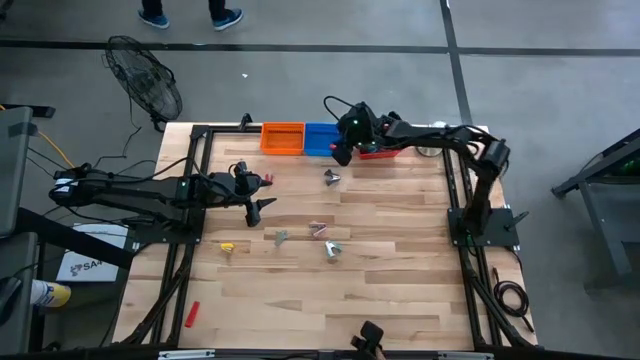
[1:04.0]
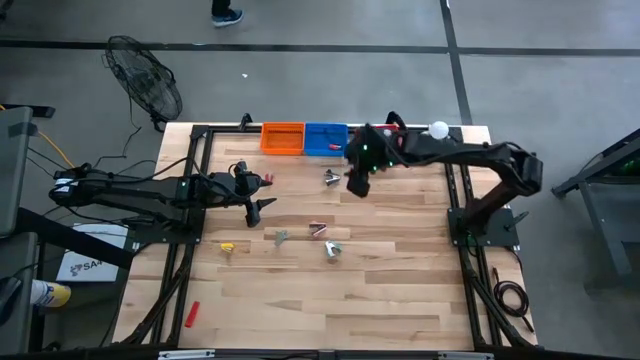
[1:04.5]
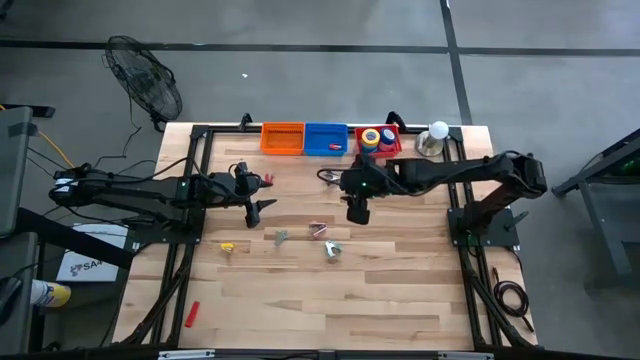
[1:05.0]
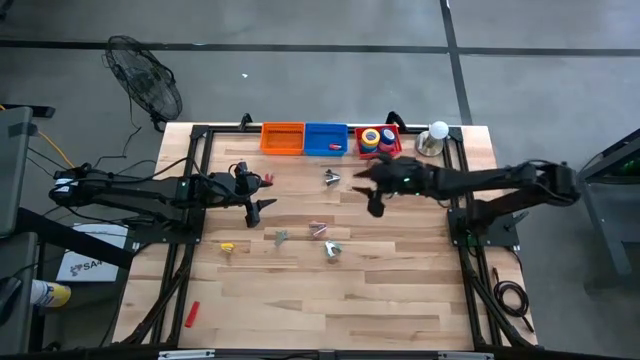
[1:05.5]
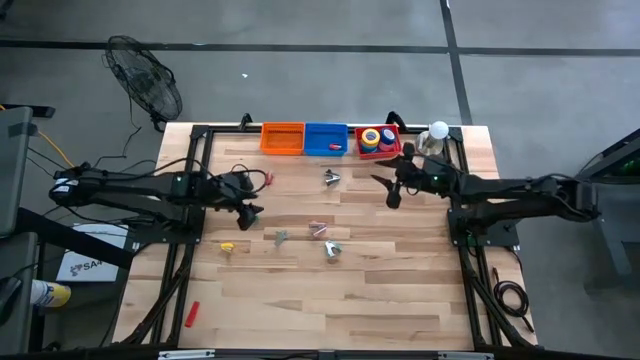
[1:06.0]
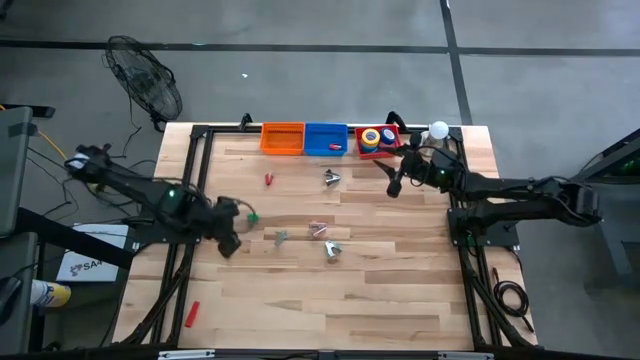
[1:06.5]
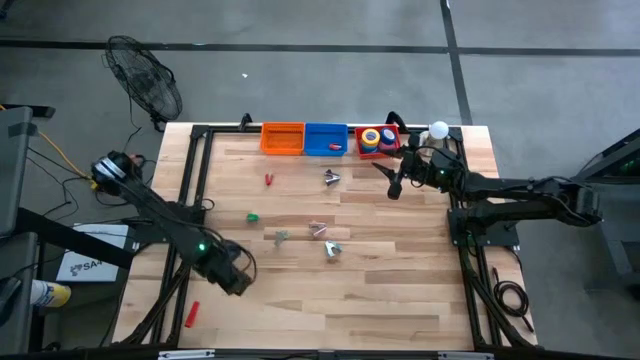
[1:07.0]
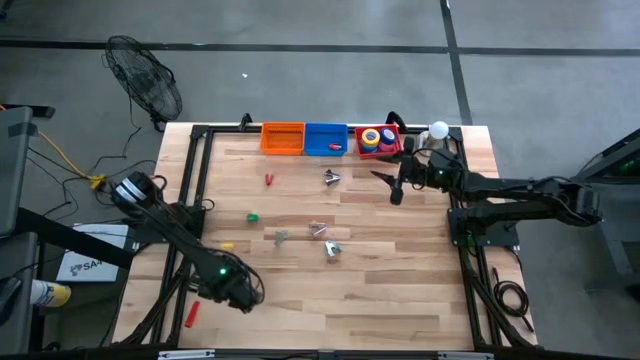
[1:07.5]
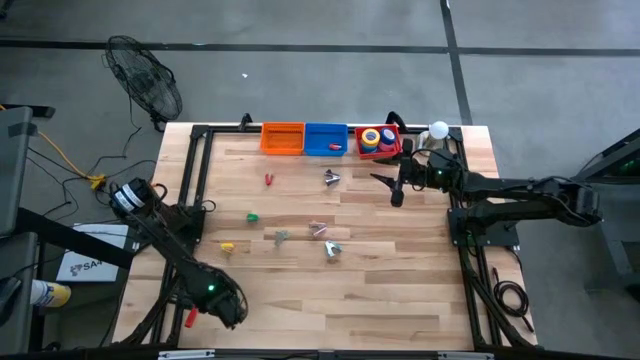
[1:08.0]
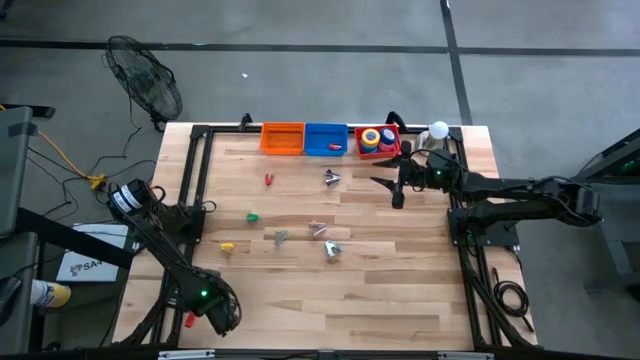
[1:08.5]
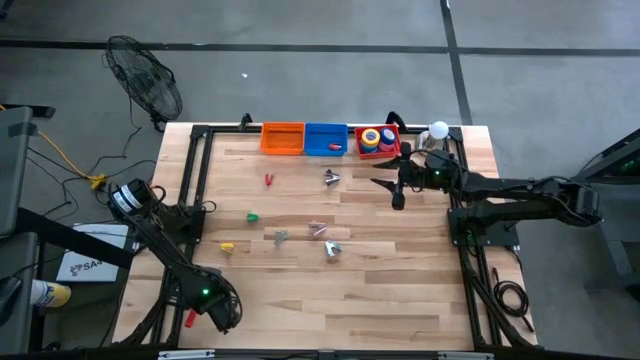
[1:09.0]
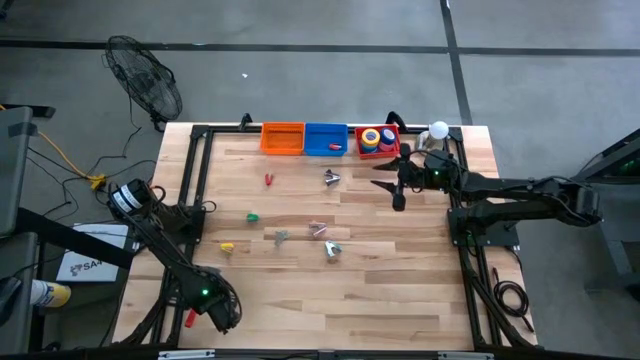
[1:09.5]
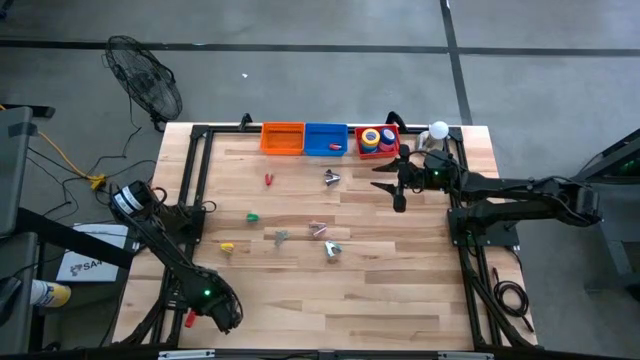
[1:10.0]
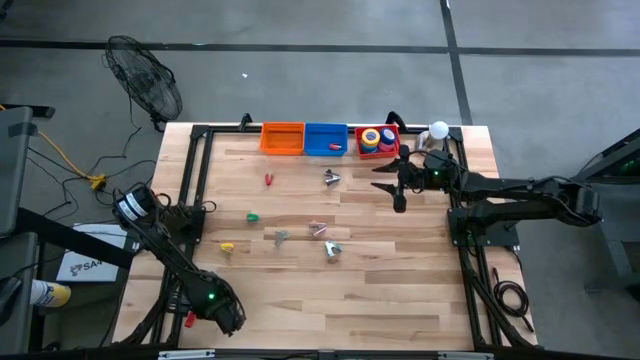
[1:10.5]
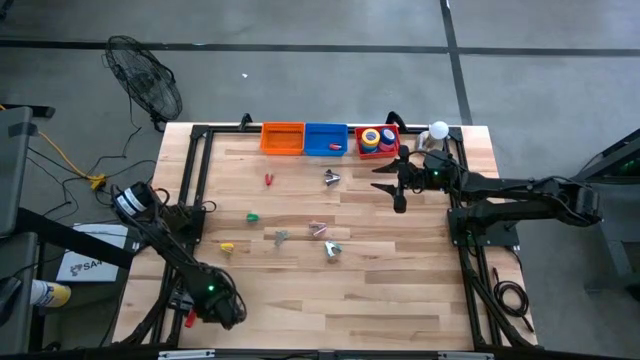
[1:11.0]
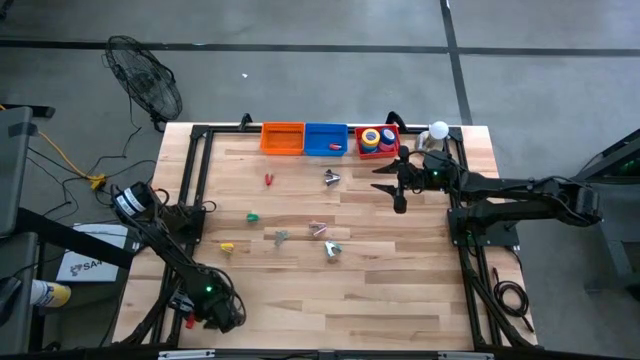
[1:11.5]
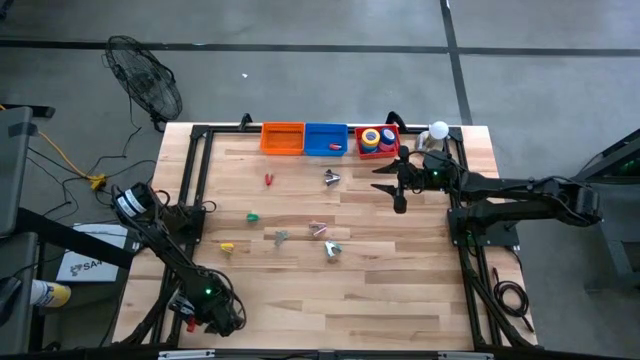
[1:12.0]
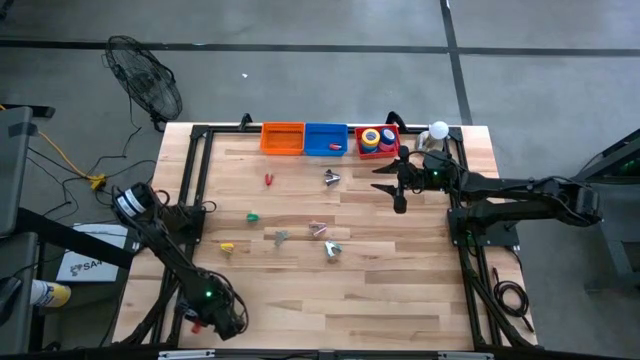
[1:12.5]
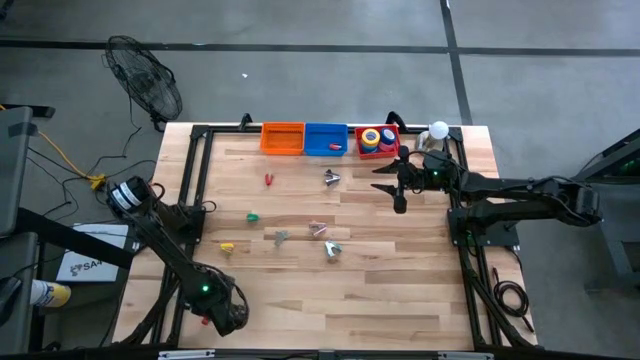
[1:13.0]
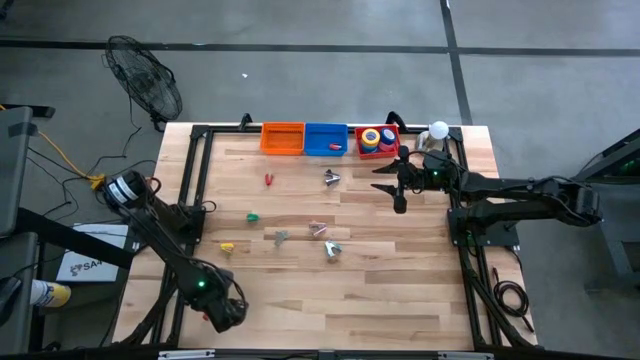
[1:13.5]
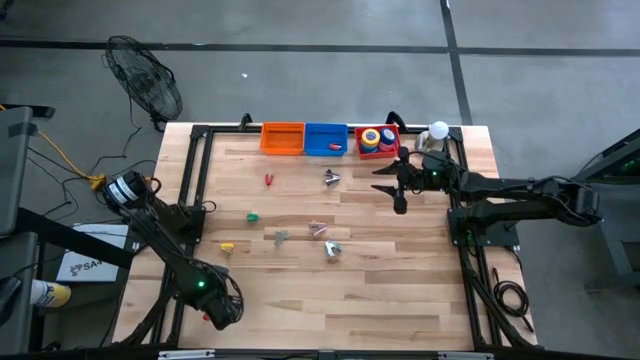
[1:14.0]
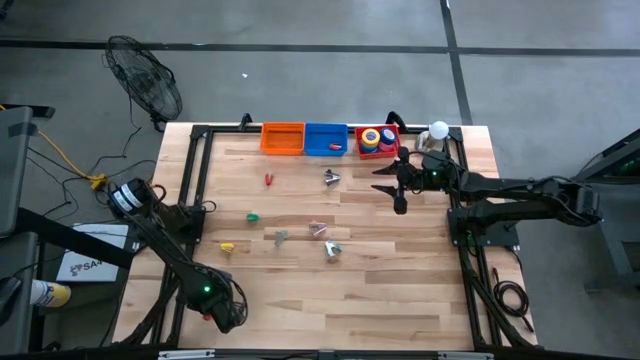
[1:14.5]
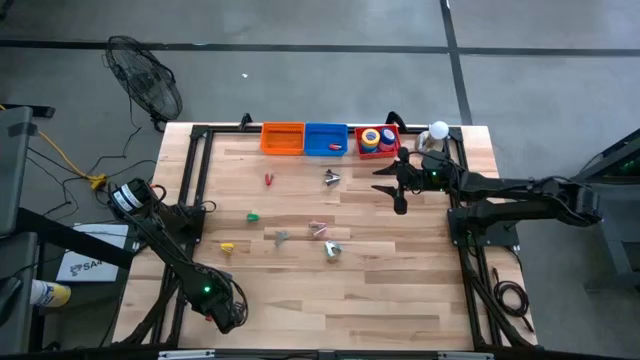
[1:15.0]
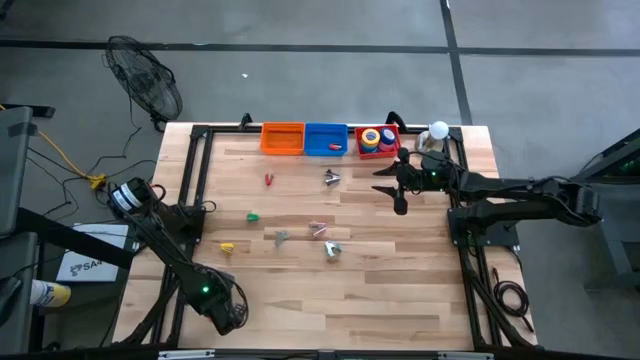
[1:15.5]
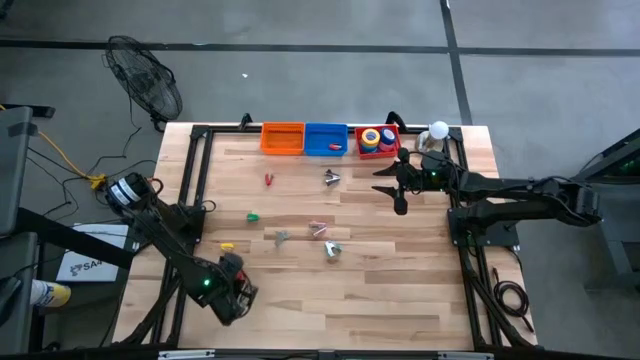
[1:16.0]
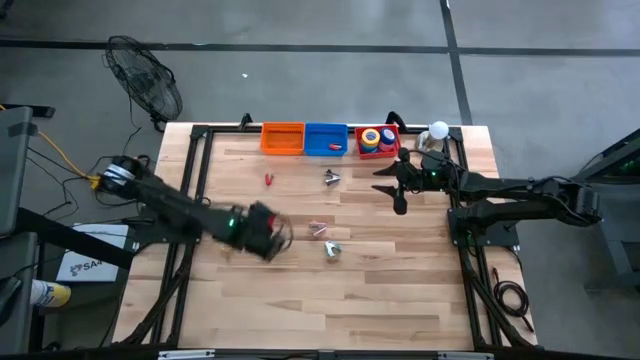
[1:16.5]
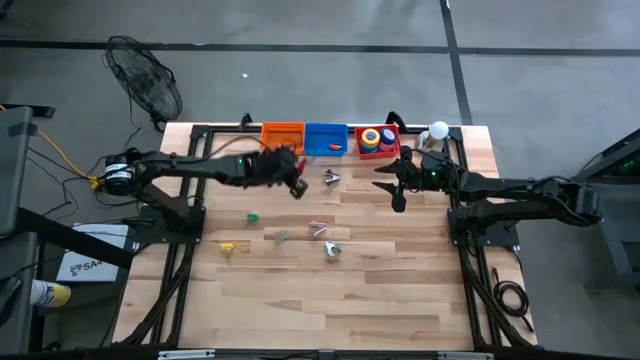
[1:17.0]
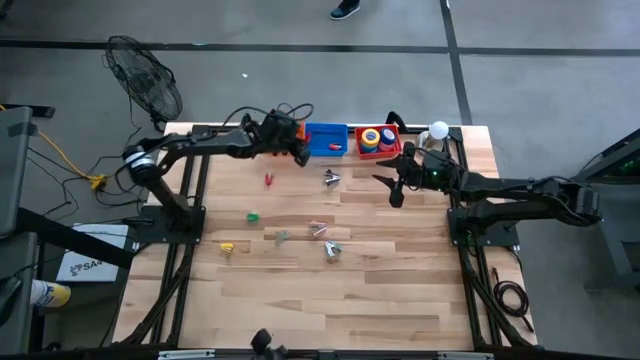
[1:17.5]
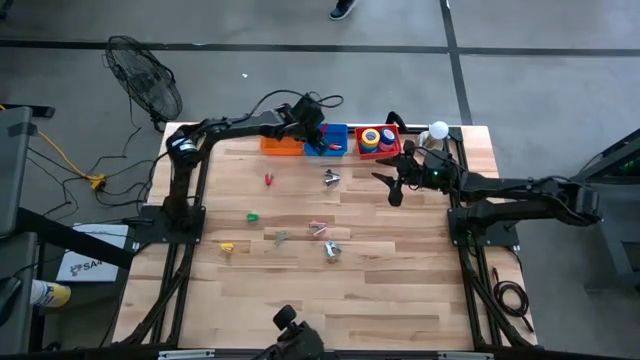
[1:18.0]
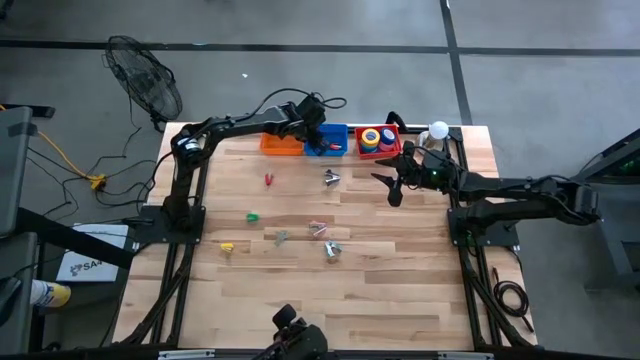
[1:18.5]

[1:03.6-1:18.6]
Task: Pick and place Stapler, Stapler remover, tape
Put the red stapler into the blue bin

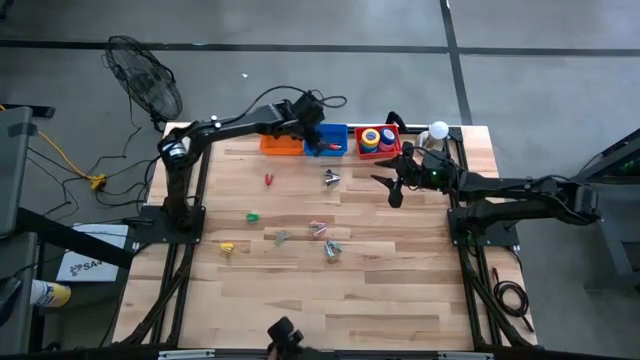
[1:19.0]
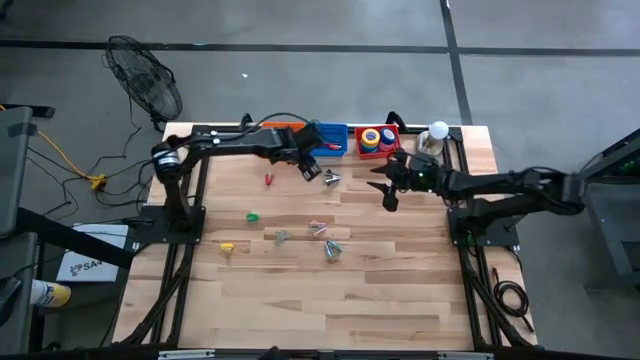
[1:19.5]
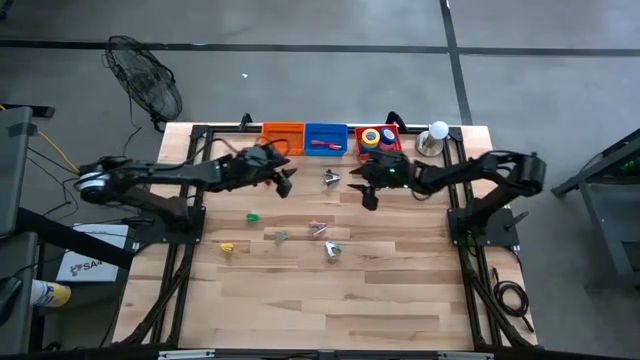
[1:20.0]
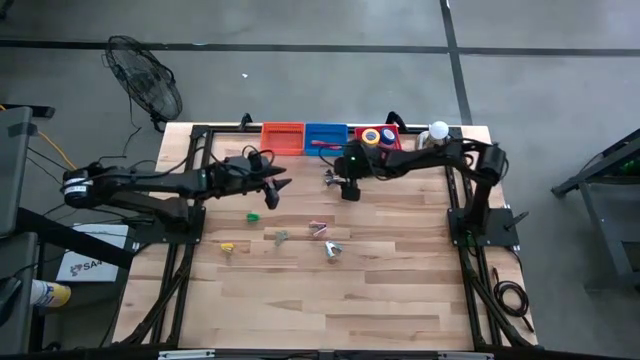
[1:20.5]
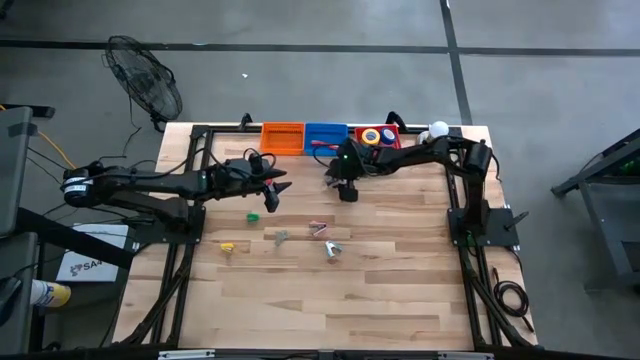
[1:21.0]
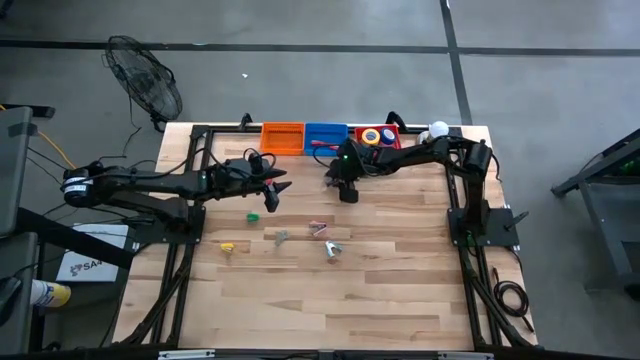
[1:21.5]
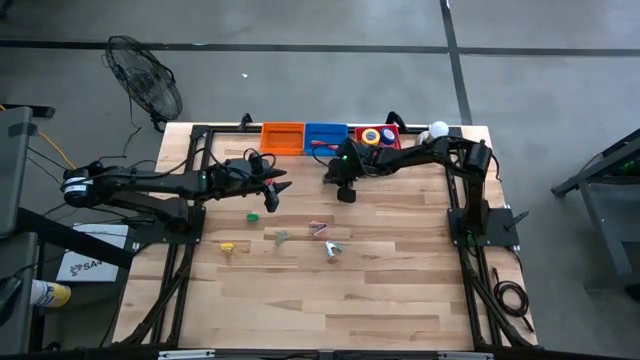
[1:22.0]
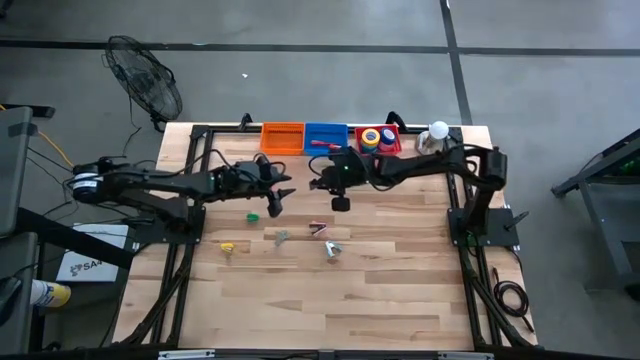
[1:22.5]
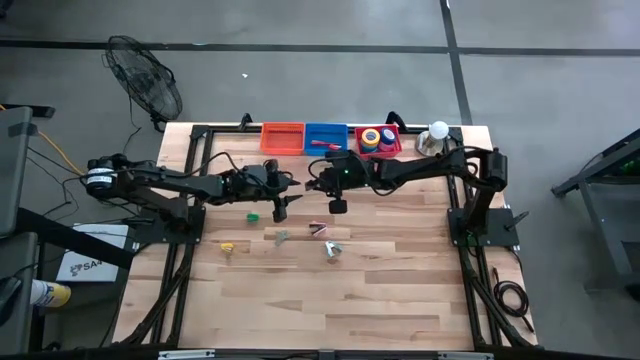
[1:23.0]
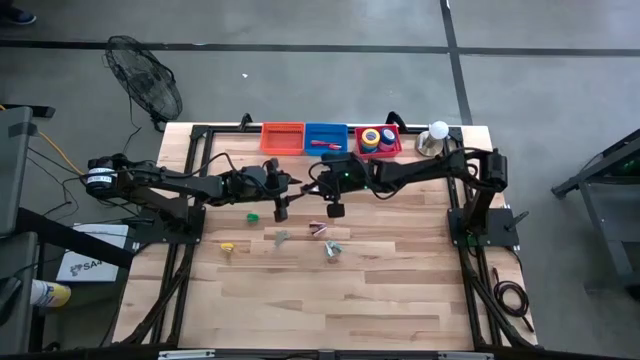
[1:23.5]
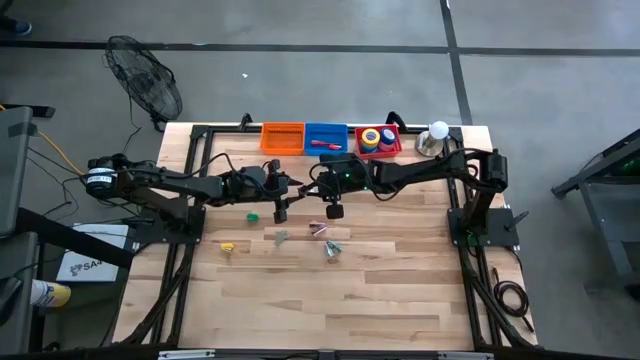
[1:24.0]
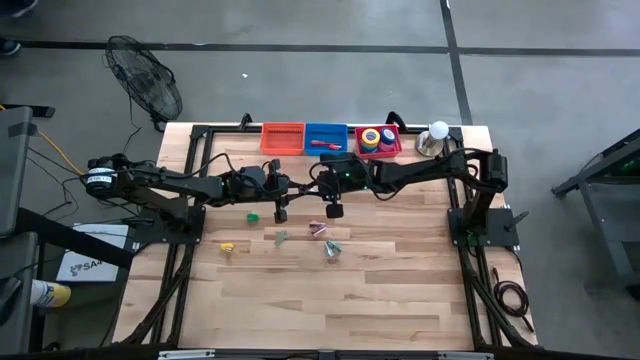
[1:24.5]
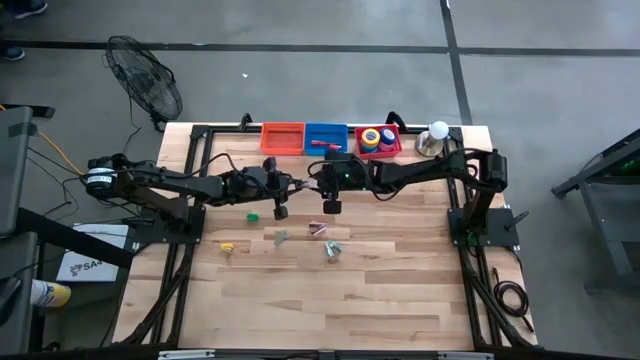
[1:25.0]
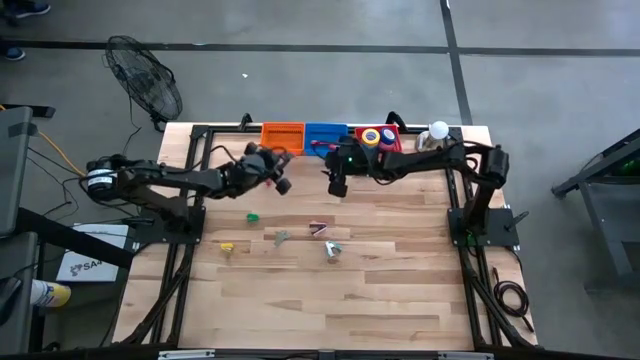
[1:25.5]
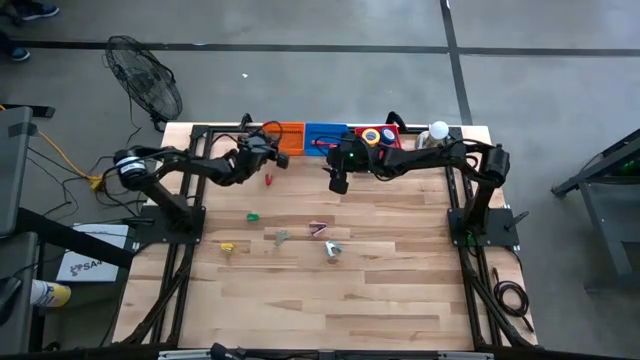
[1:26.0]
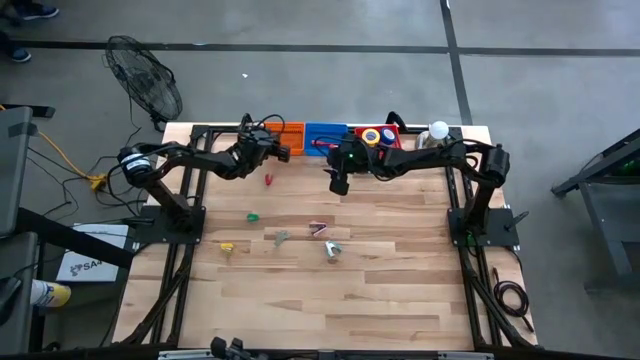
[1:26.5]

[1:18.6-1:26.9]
Put the gray staple remover into the orange bin
